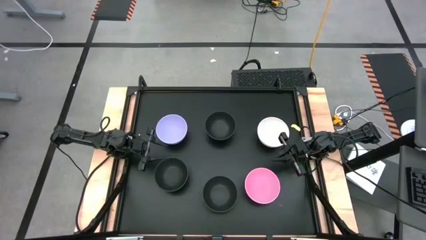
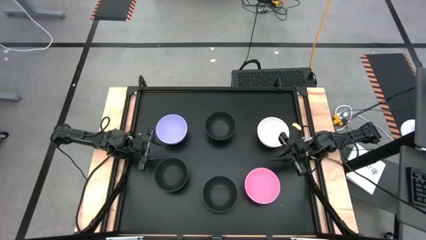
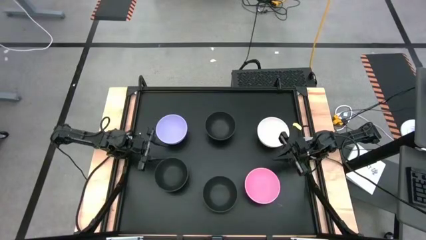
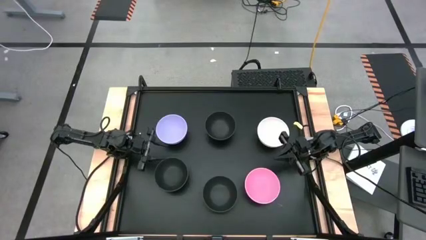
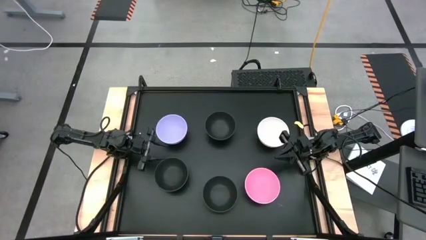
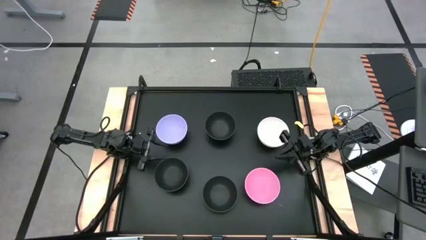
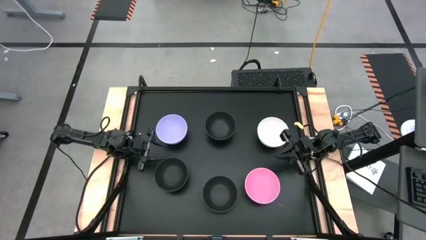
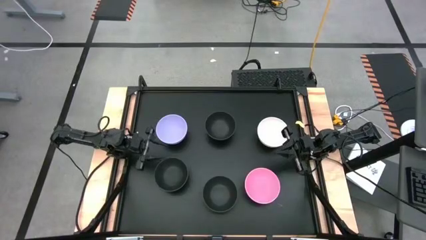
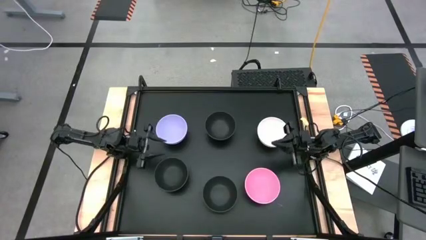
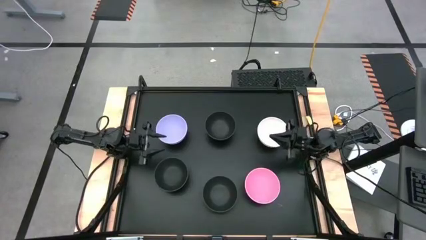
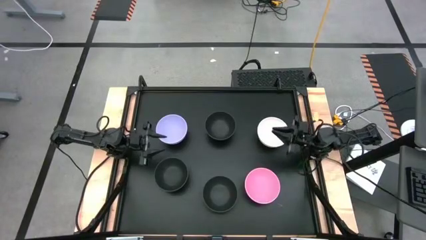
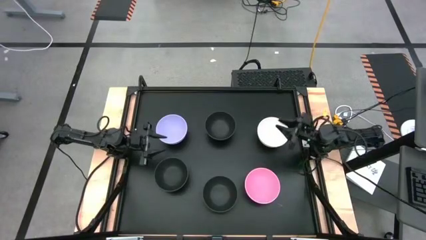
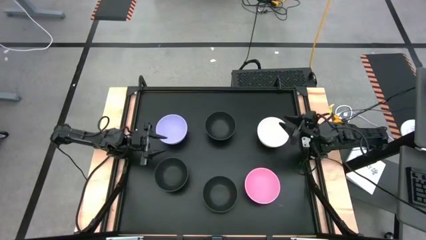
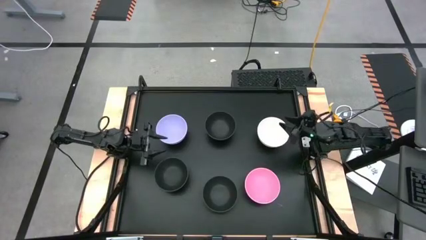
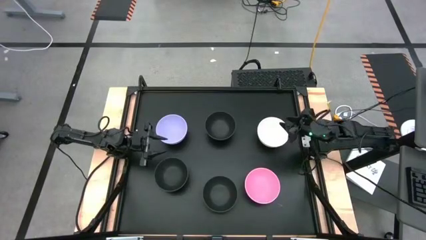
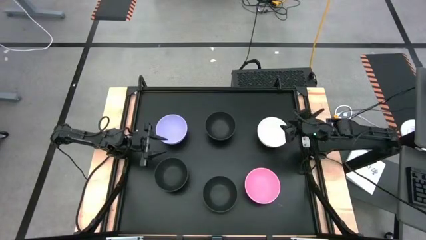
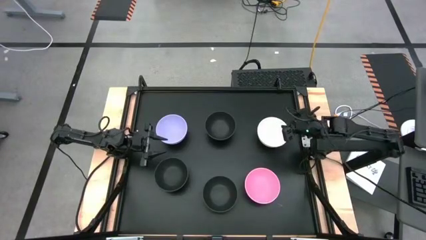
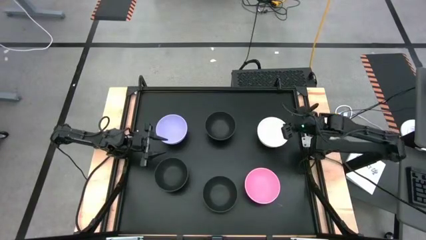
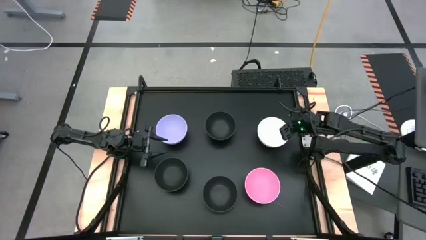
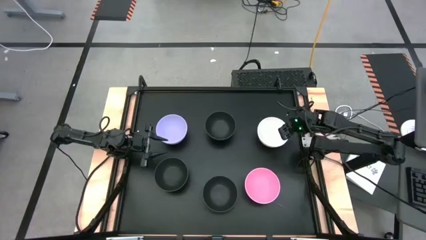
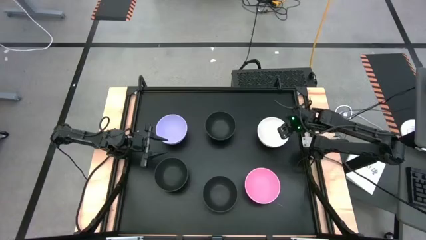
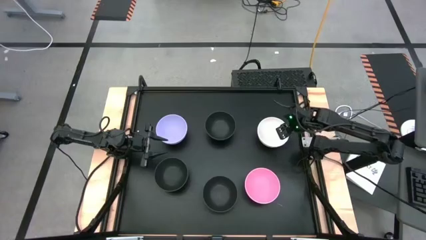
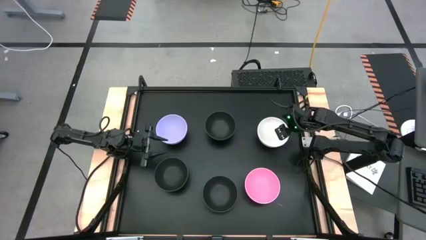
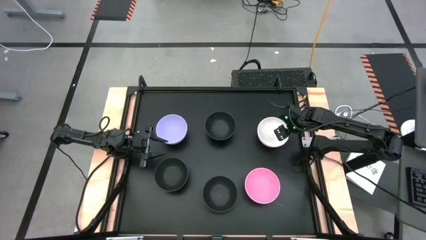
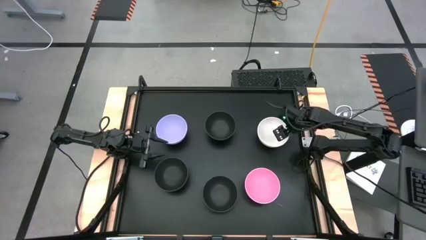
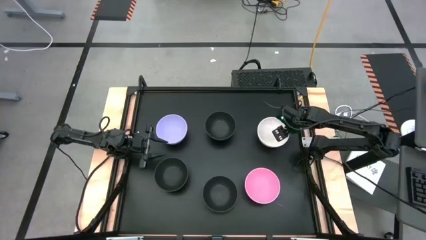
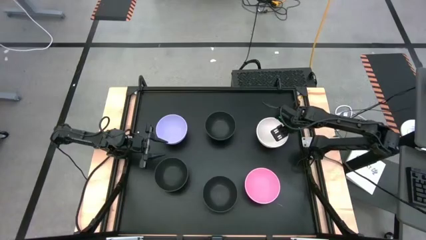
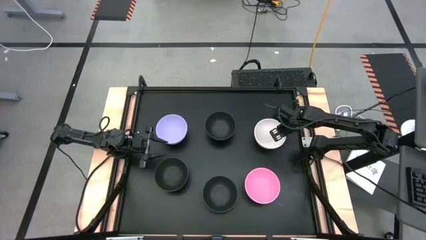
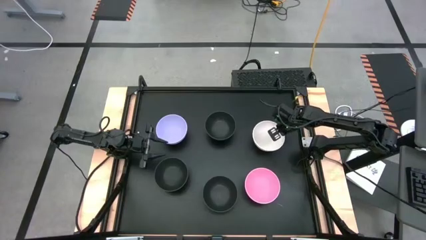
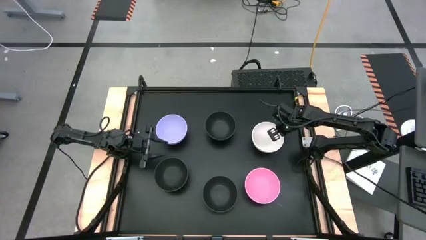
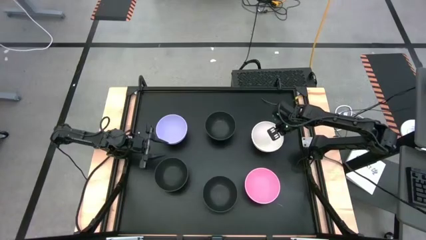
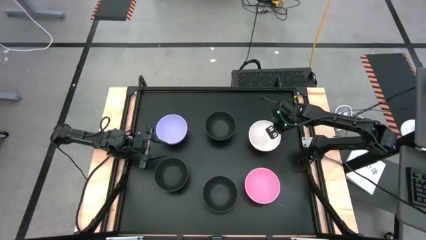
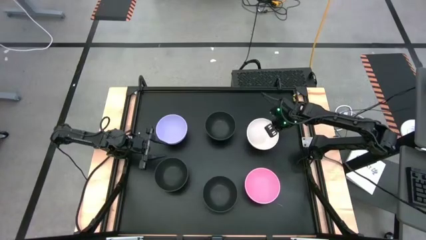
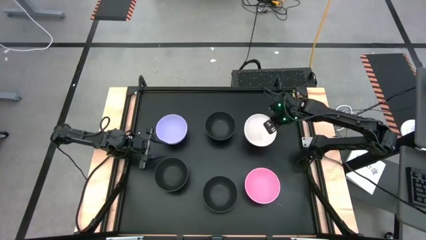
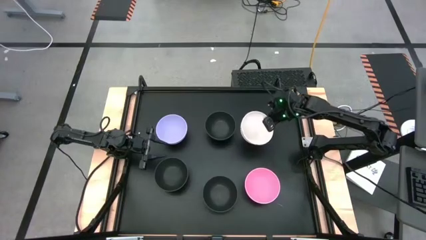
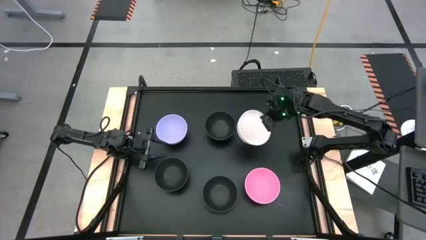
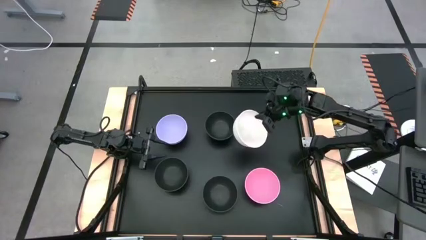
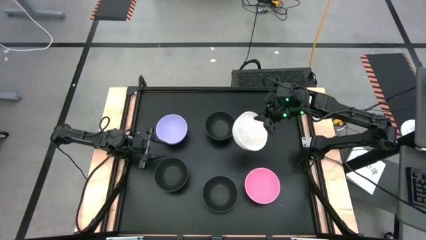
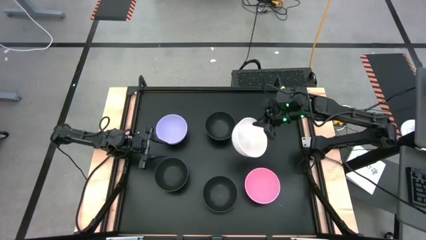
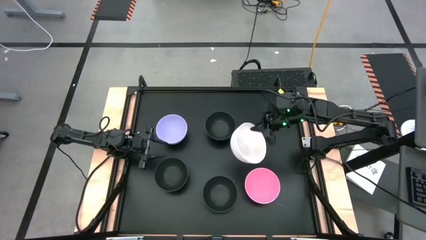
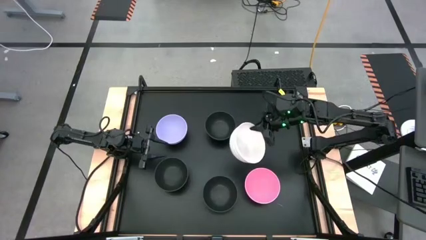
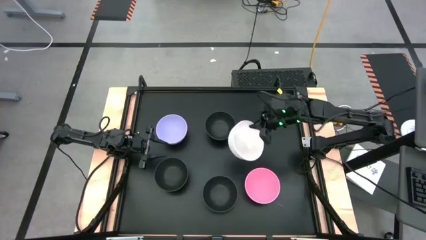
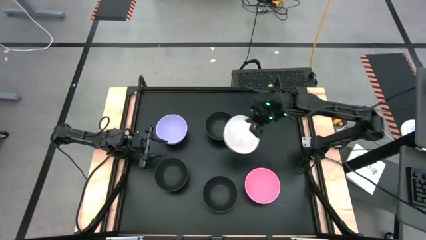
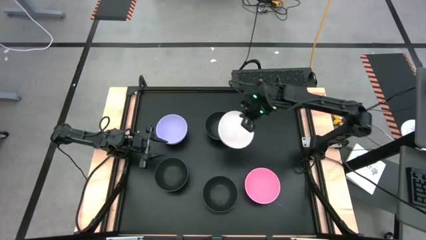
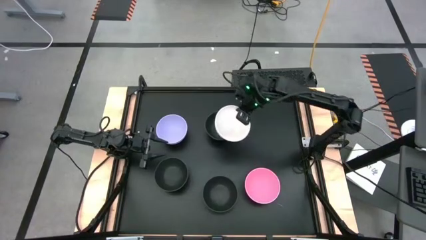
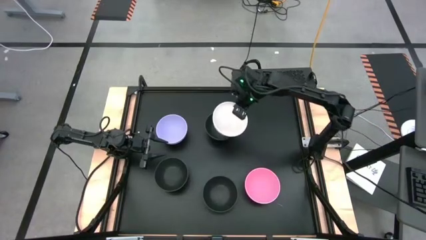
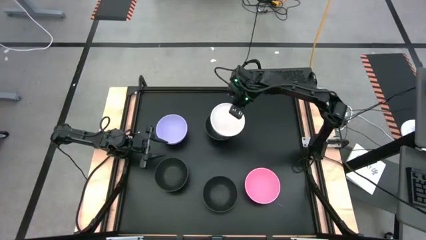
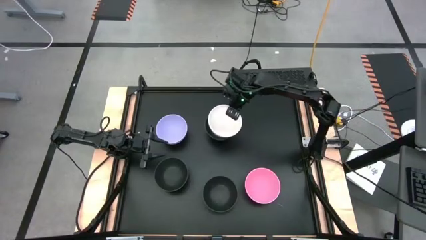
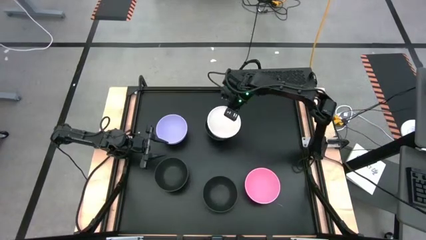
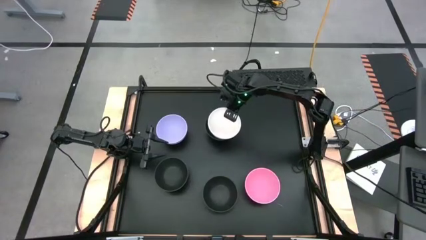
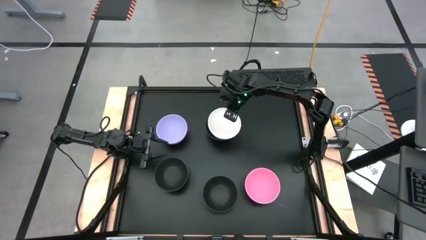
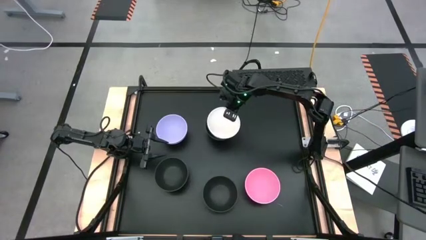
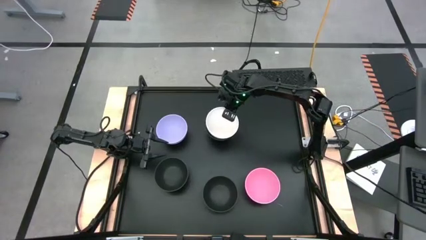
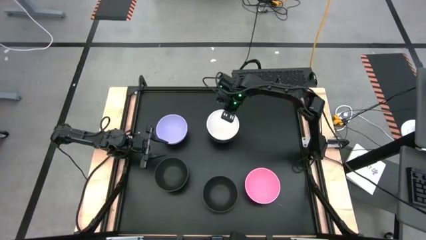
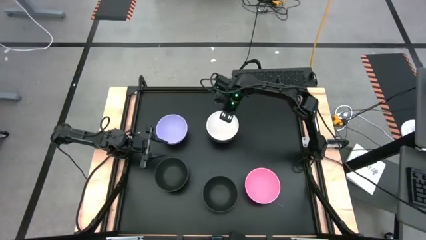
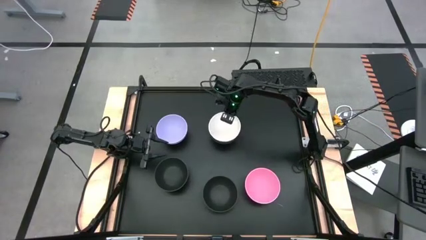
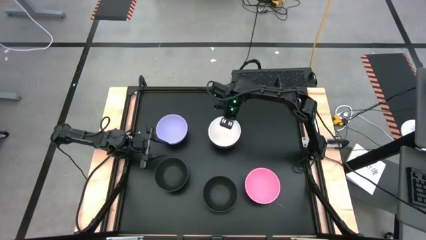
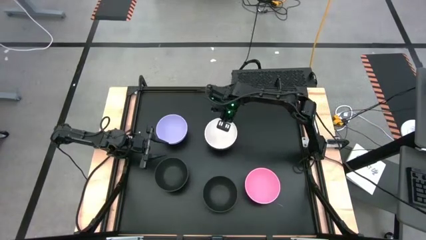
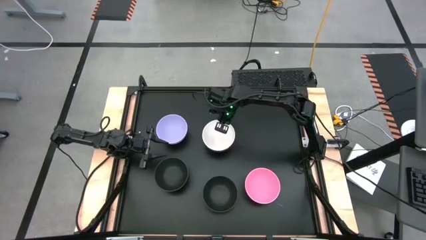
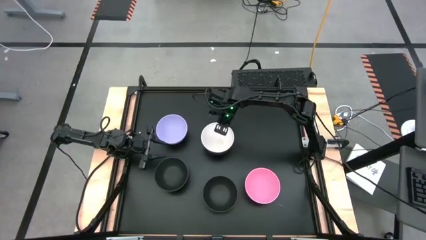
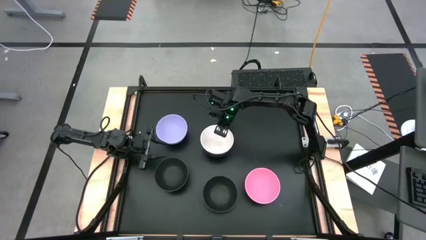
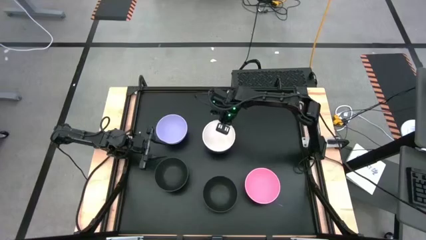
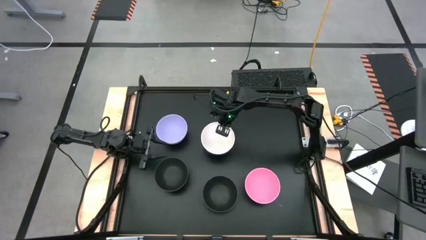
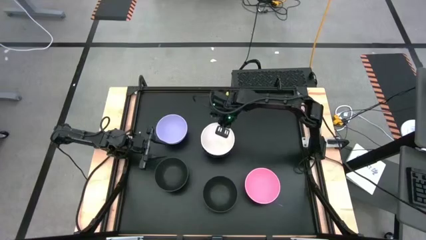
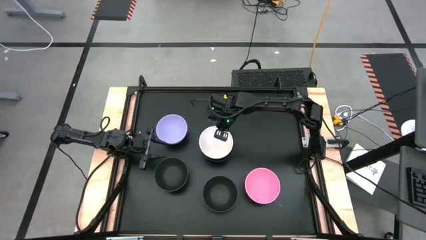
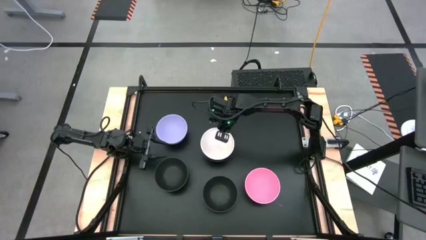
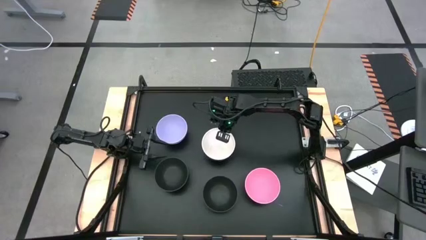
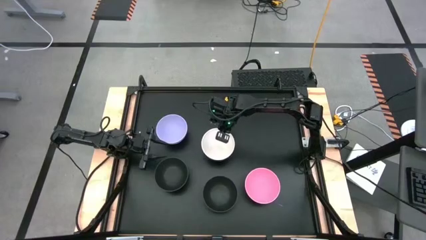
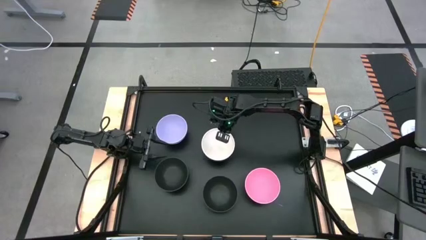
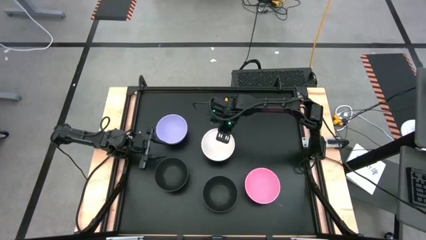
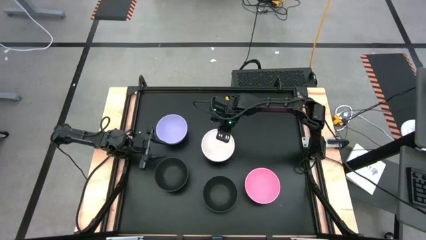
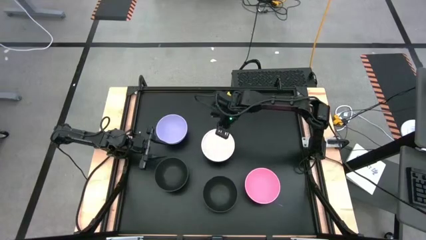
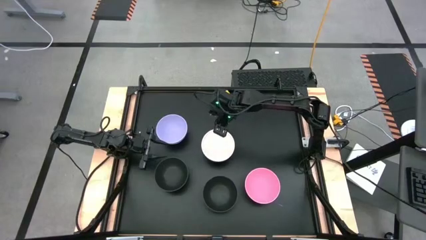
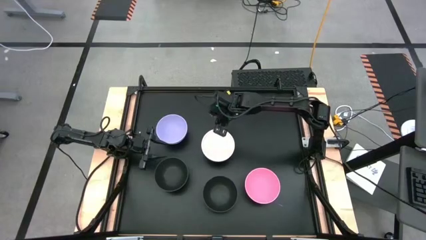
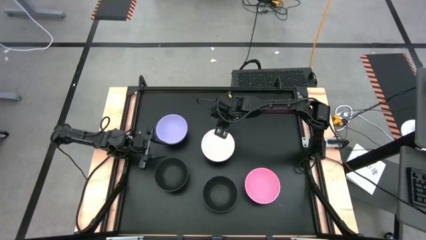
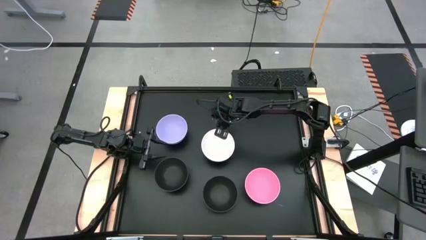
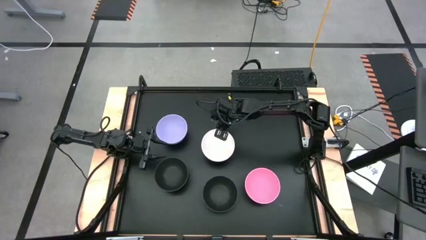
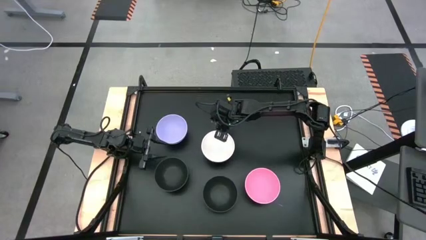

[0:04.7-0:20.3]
Task: Nest bowls inside each other
Stack the white bowl on top of the black bowl
